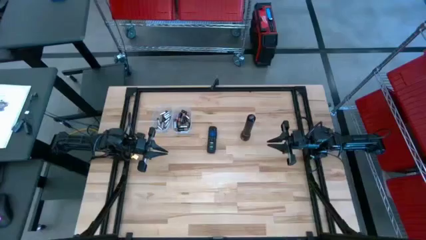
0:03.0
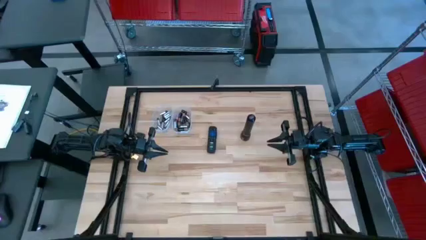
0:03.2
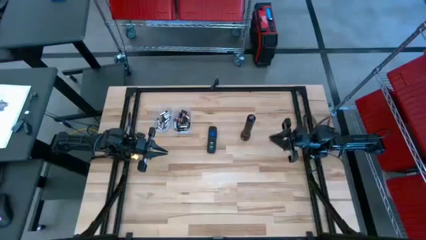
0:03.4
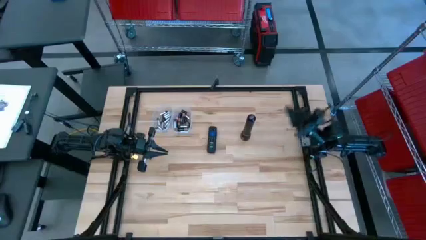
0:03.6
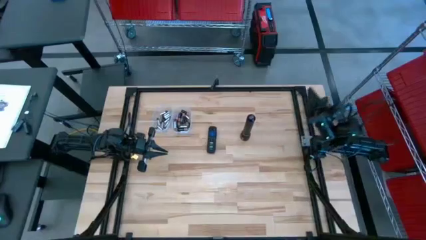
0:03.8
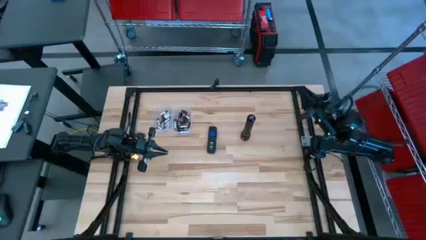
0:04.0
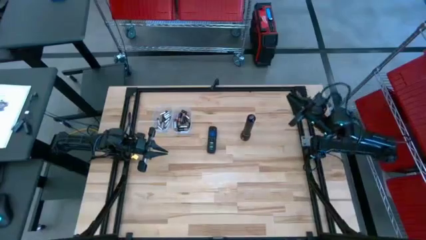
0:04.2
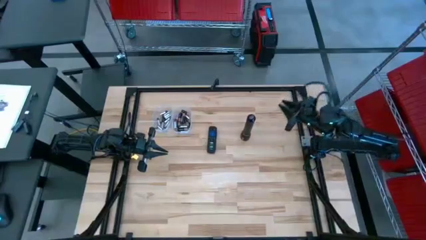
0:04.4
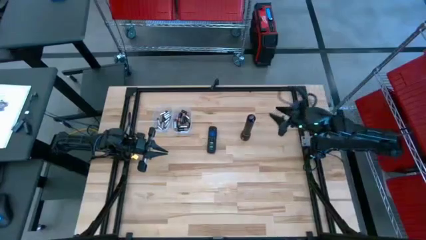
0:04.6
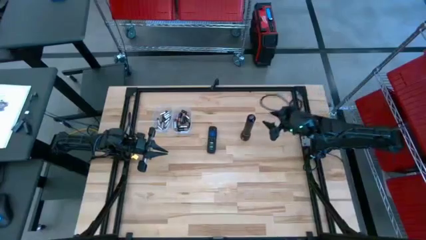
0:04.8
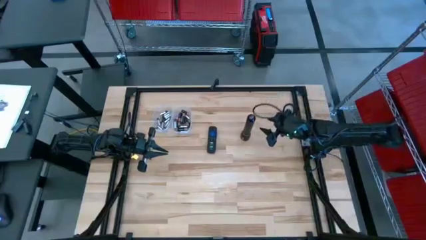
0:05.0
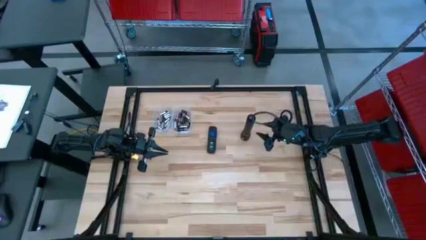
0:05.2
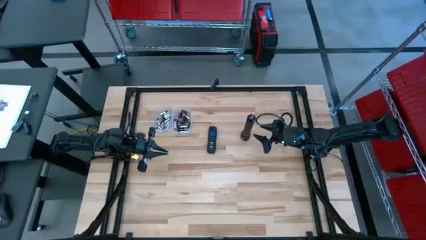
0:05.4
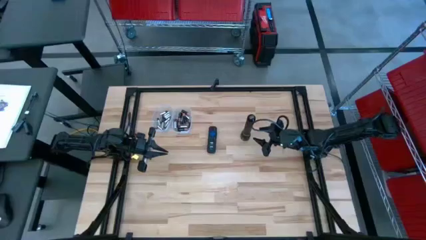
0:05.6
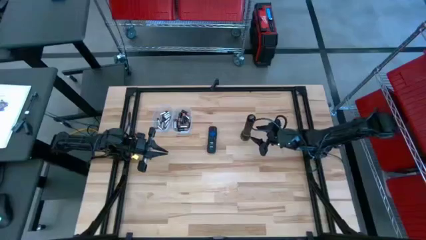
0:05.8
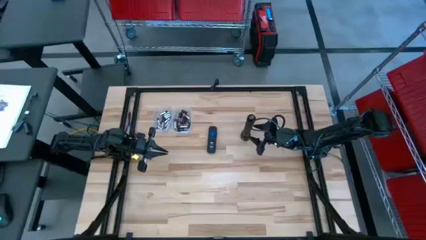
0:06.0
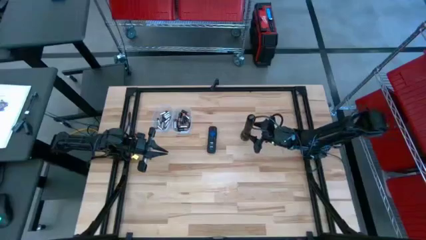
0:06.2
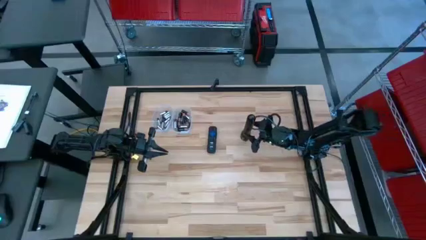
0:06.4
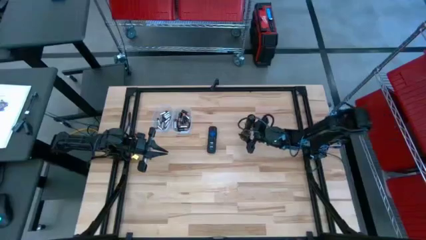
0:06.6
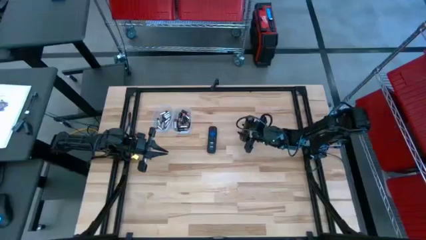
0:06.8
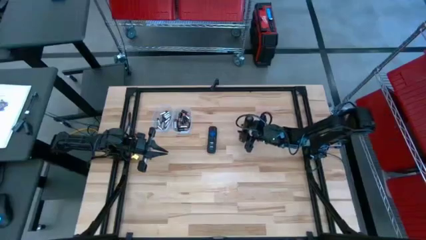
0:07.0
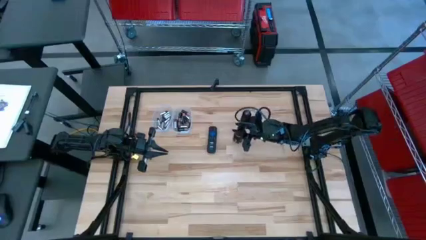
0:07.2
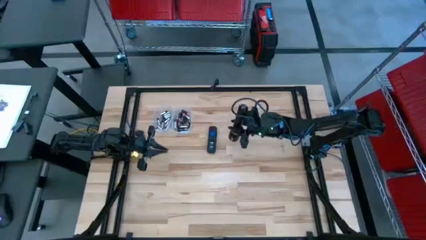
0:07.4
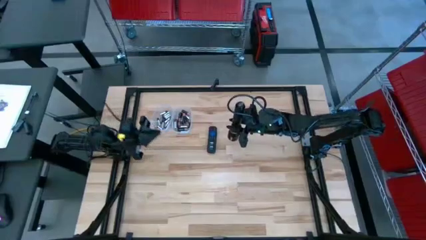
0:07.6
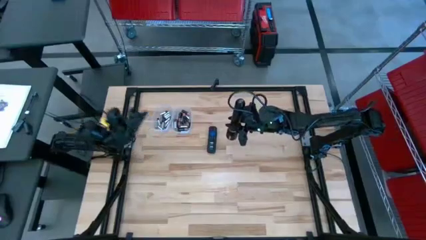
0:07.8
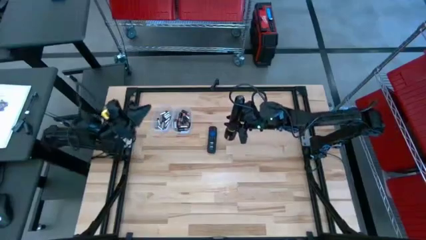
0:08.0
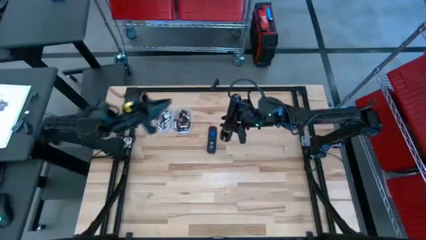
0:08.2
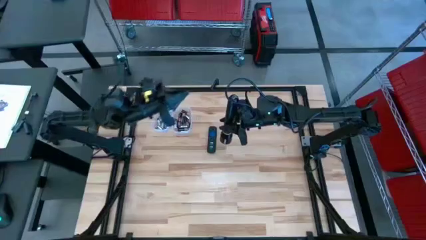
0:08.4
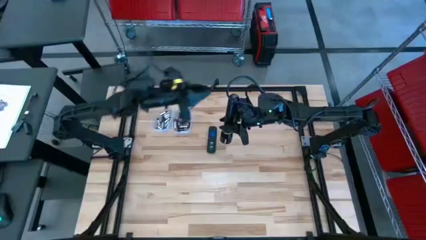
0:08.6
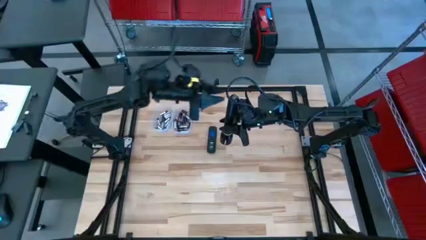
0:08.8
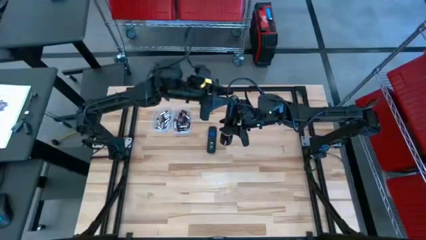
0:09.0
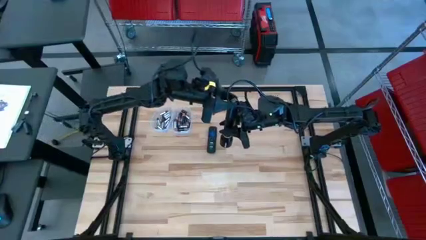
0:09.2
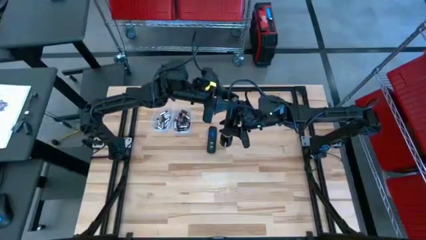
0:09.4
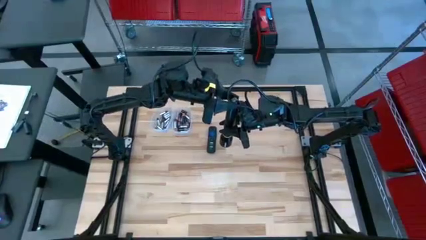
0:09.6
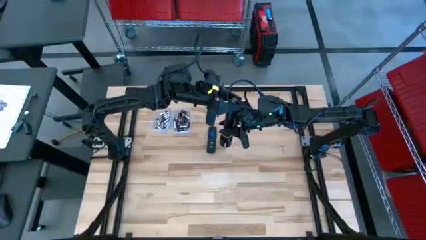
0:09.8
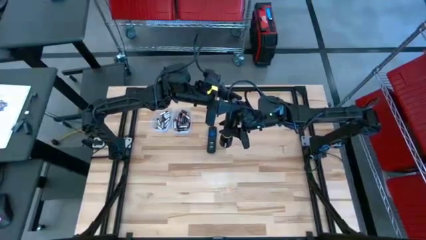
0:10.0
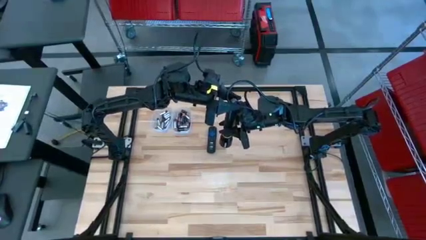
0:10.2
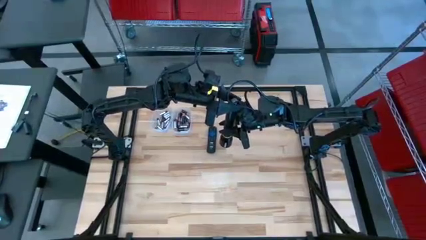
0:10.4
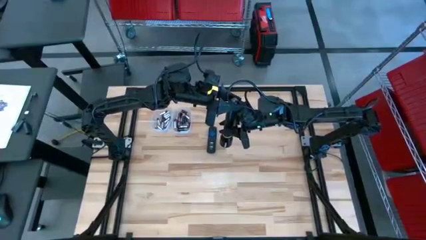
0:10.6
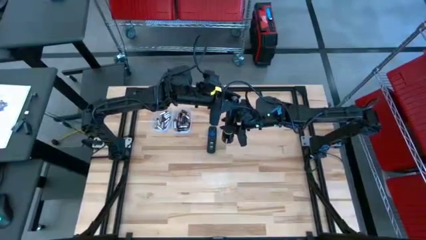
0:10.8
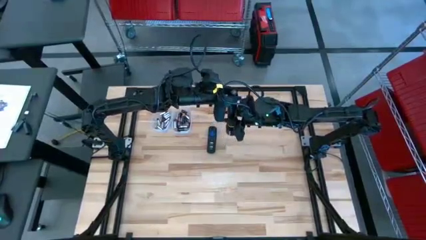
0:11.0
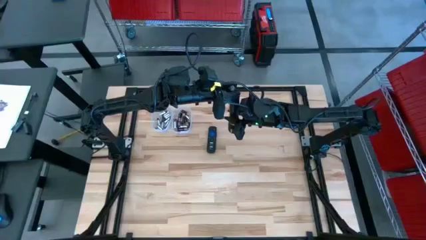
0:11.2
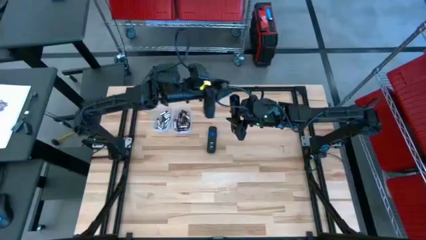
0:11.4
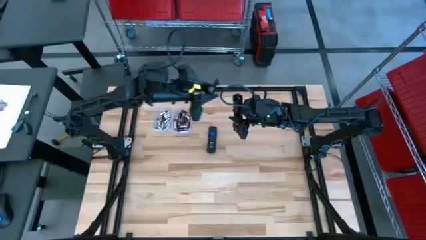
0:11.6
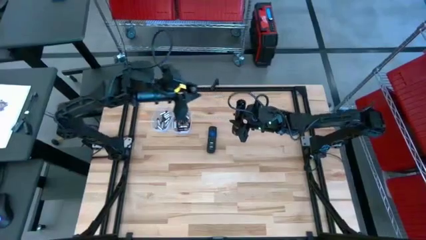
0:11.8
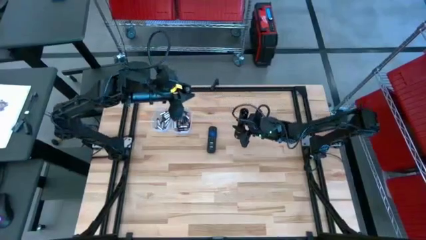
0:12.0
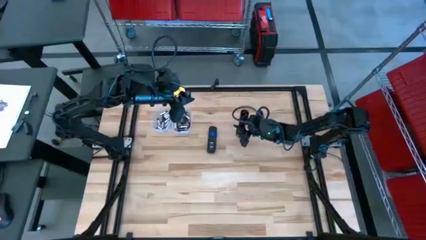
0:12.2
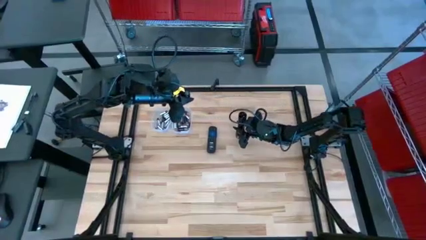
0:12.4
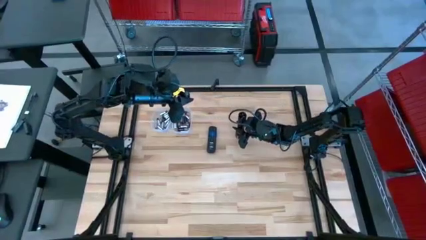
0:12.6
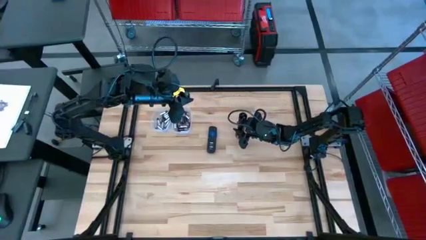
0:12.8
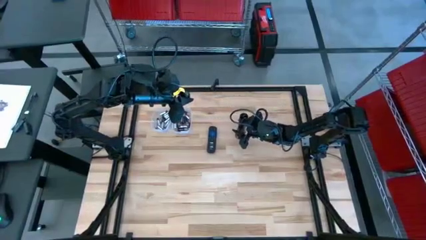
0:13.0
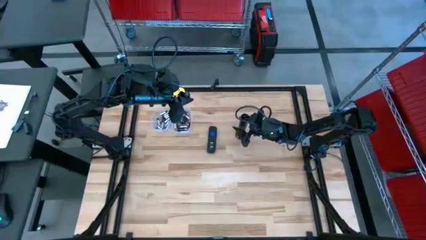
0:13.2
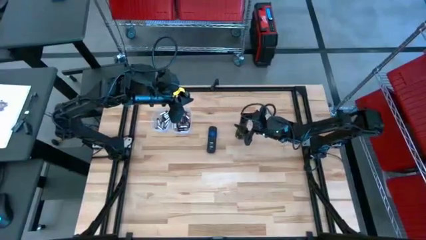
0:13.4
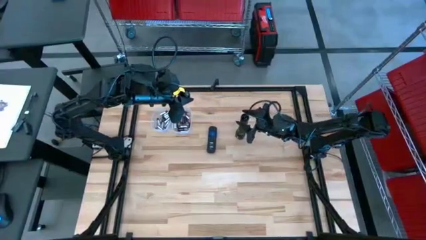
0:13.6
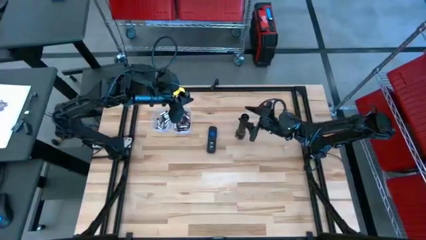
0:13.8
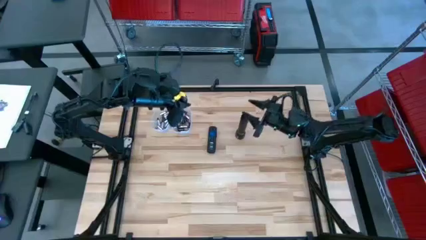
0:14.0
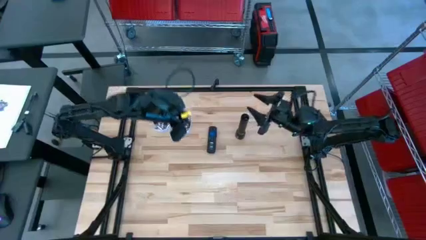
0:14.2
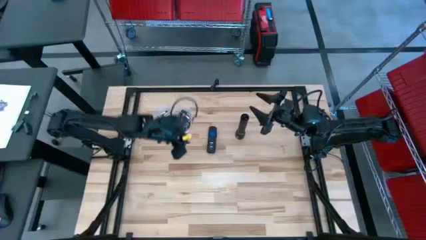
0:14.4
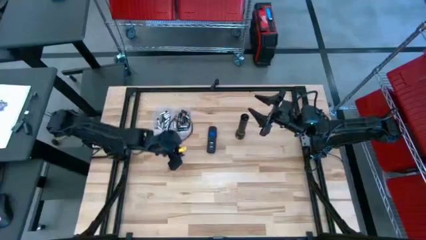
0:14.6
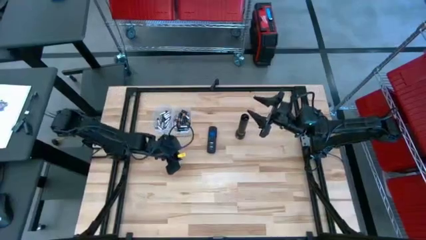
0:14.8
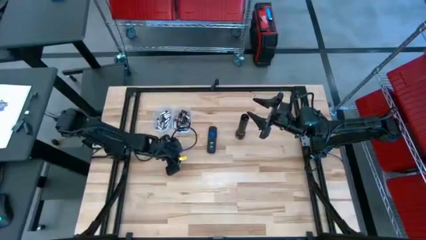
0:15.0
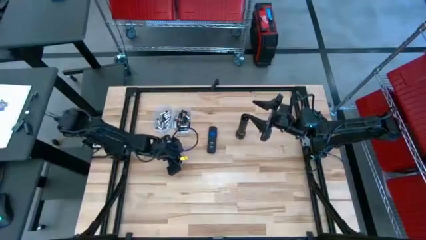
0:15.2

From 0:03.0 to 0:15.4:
Task: Insert battery
Open the flashlight battery compartment
